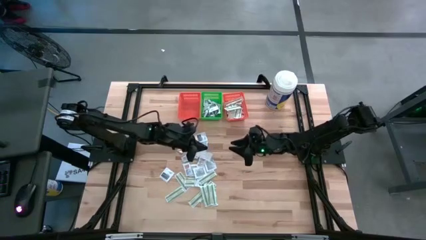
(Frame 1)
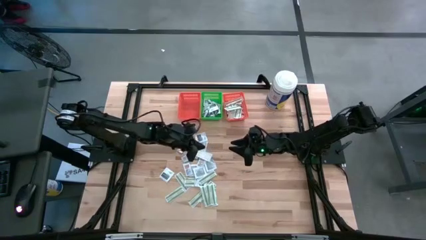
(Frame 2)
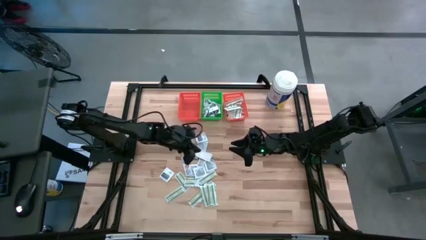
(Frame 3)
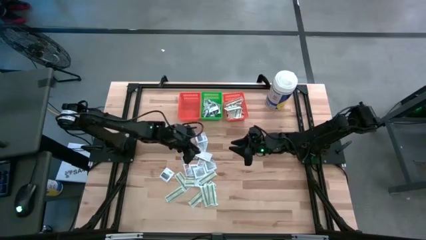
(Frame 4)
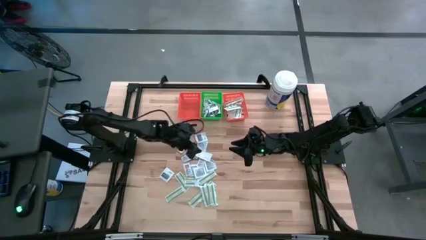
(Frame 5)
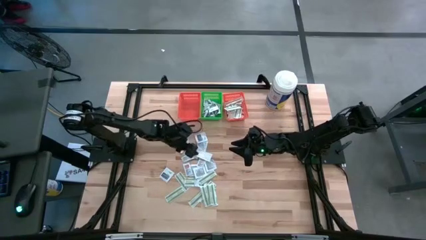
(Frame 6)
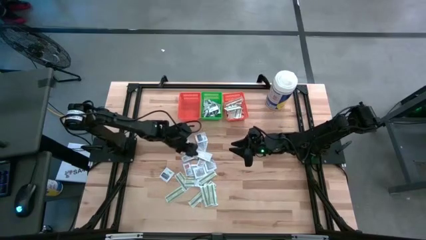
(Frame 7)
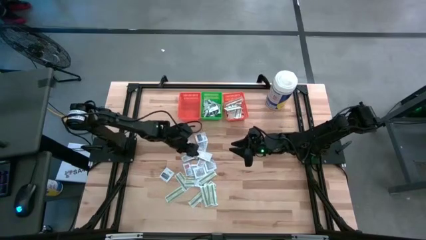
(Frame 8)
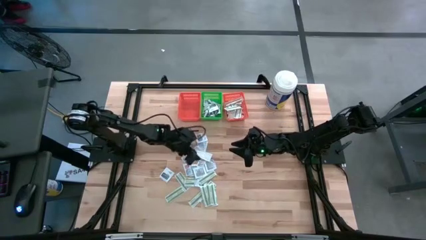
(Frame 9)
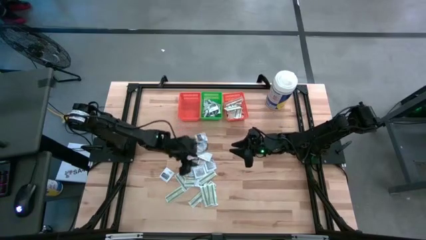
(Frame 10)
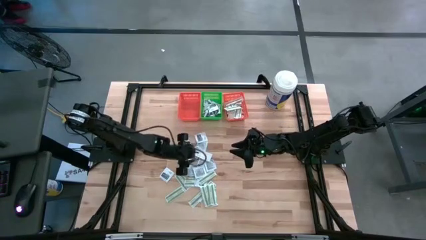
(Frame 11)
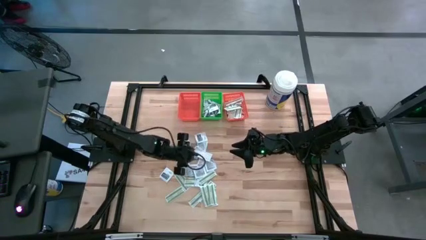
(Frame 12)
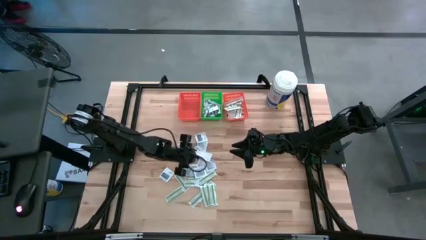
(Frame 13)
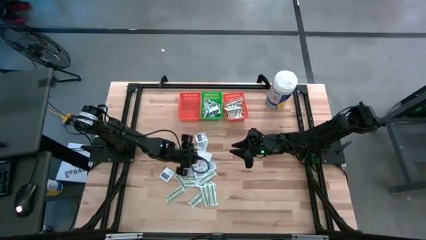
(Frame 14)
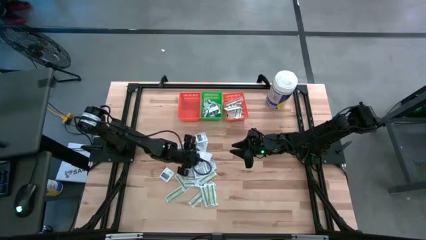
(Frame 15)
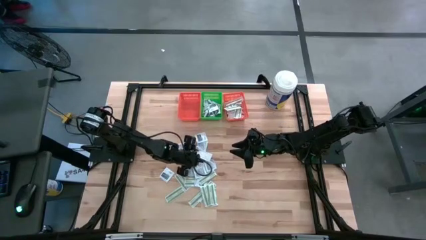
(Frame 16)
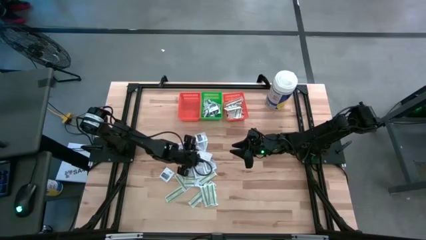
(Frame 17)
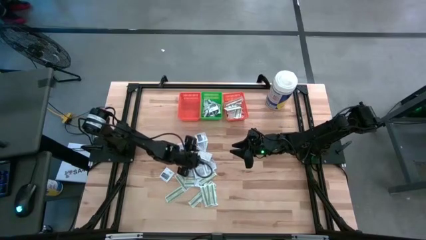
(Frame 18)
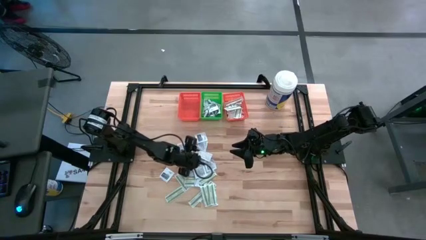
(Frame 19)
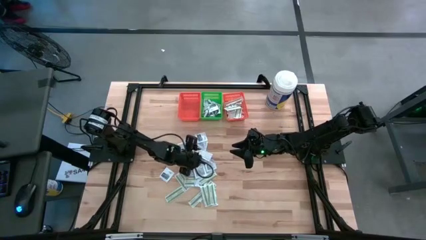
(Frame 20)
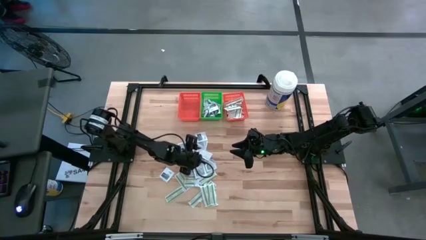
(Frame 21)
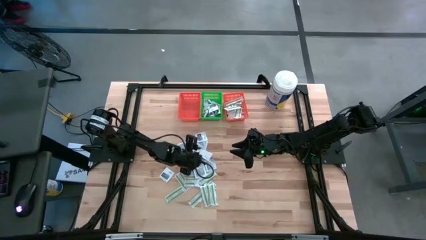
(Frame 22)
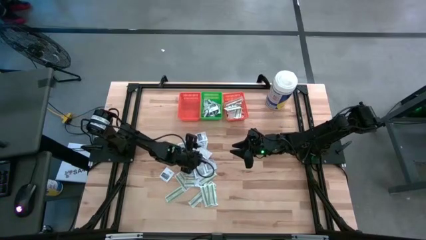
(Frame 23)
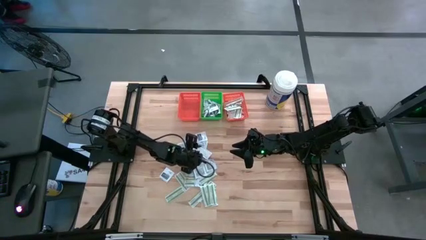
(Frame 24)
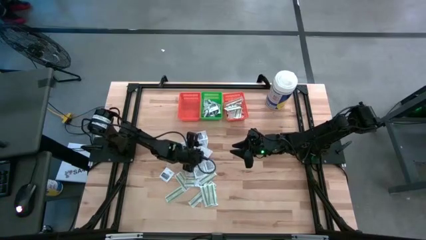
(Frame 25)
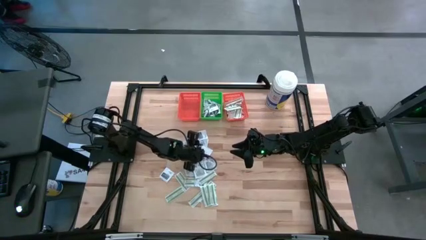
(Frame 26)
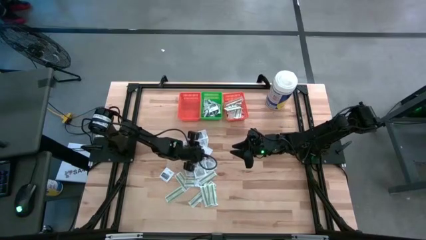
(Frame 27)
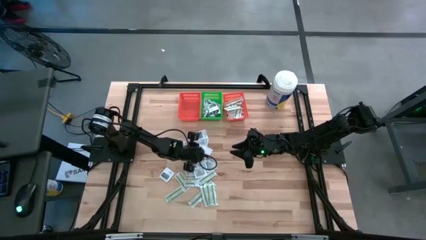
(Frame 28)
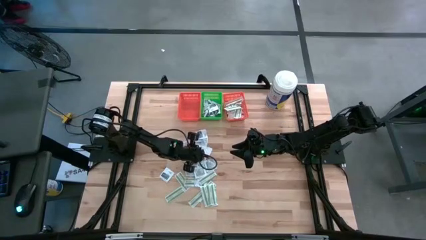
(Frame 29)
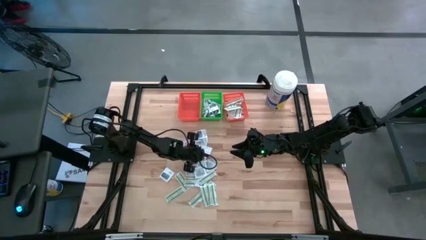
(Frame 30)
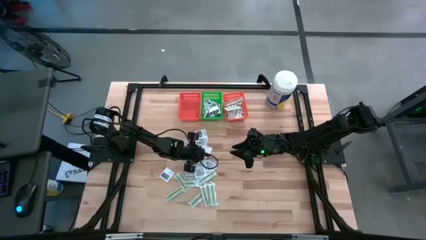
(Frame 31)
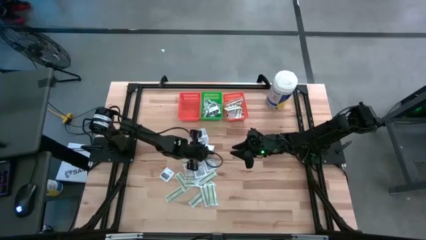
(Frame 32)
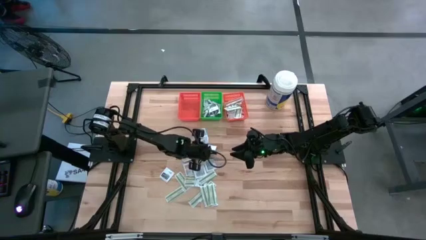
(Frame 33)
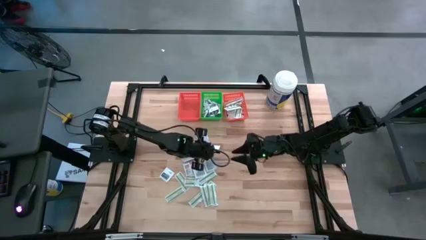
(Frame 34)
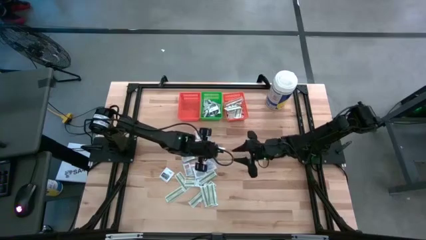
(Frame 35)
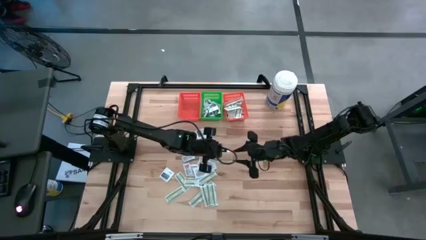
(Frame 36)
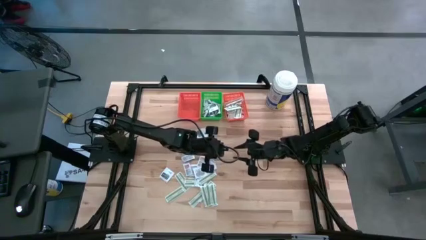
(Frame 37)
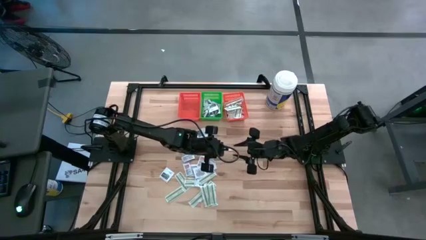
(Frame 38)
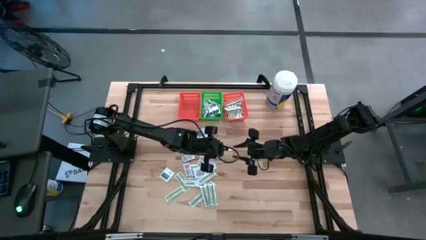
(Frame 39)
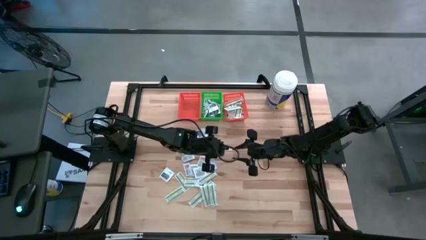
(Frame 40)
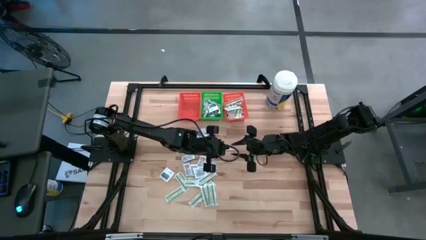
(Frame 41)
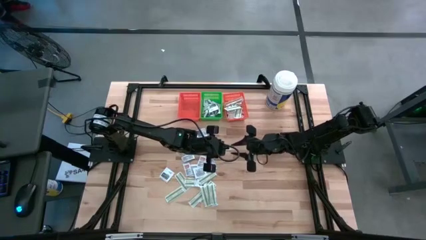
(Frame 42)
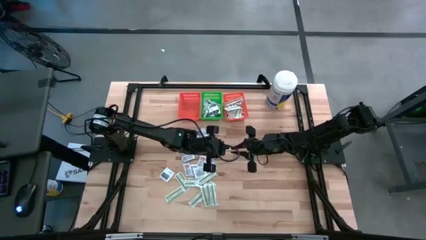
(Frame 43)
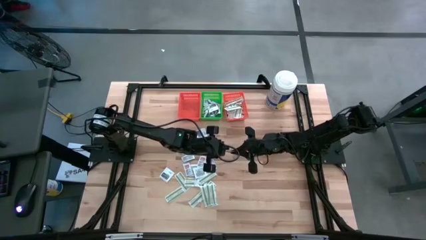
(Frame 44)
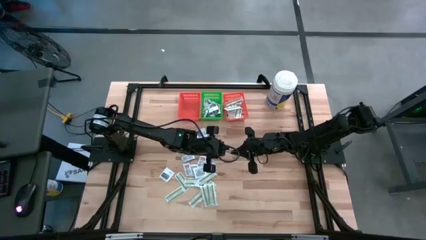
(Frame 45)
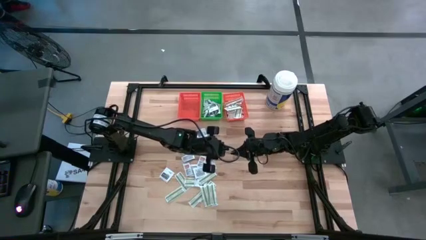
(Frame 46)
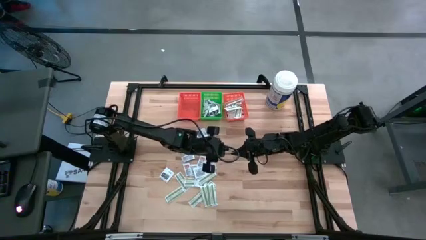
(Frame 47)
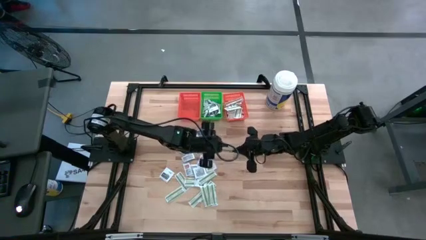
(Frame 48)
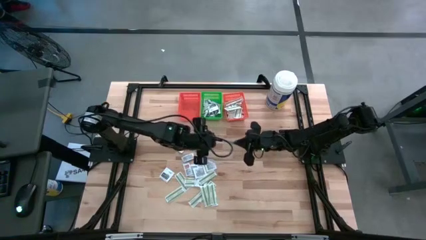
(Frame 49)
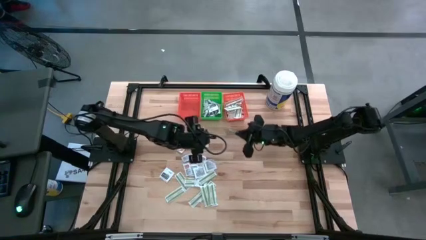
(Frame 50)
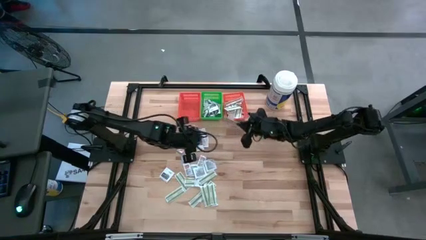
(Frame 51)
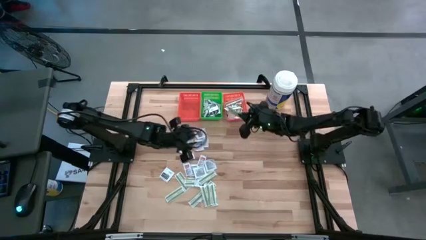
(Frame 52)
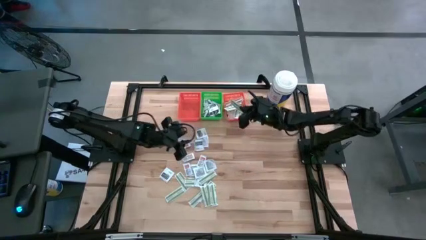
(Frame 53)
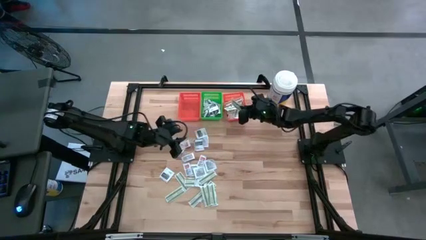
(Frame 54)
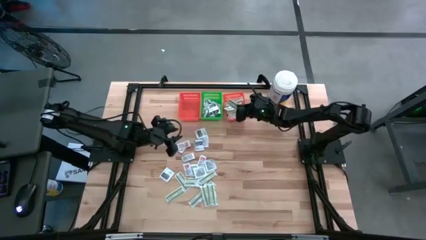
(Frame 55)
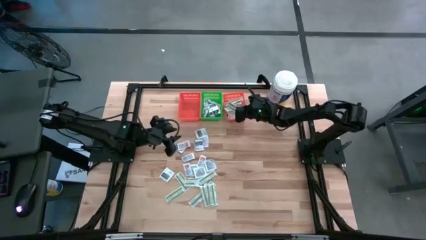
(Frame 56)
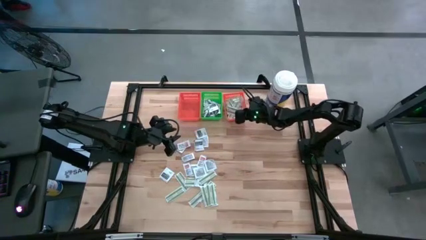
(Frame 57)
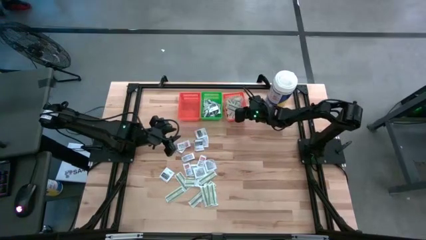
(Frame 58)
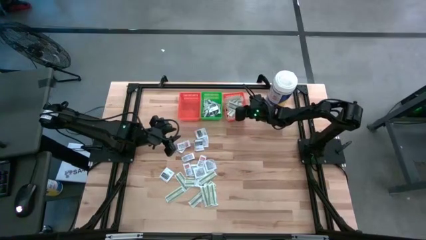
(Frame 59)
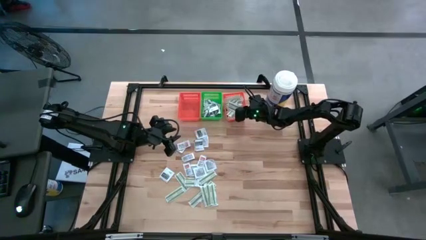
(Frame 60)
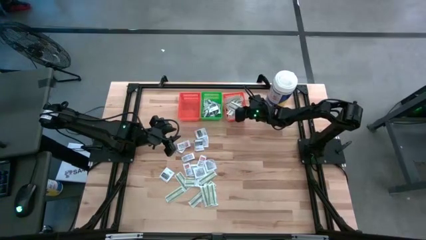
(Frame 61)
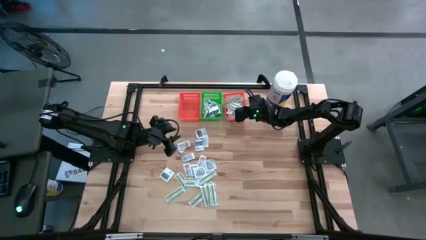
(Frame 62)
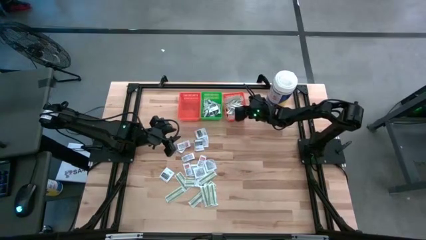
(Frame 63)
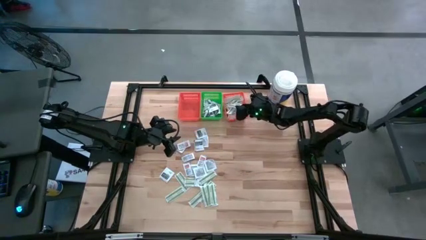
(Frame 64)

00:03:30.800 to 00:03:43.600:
Task: Pick & Place First Aid Supplies
Put the bandage pack into the right orange bin
